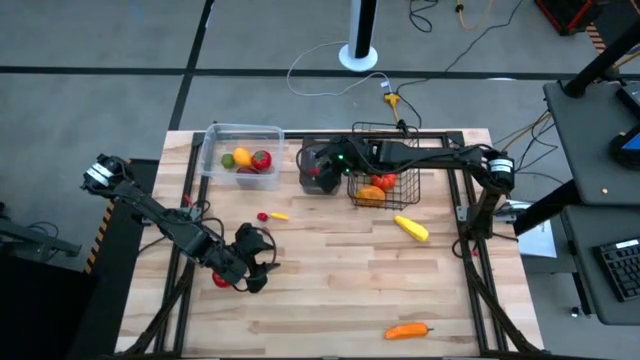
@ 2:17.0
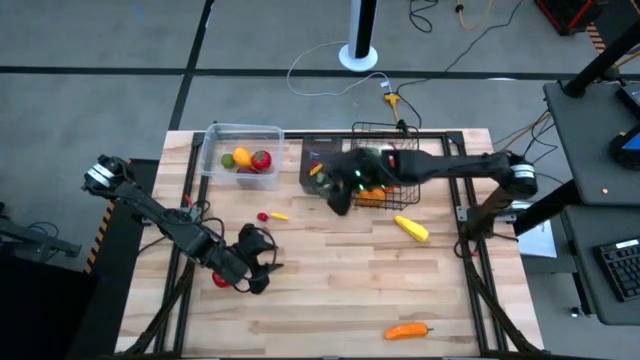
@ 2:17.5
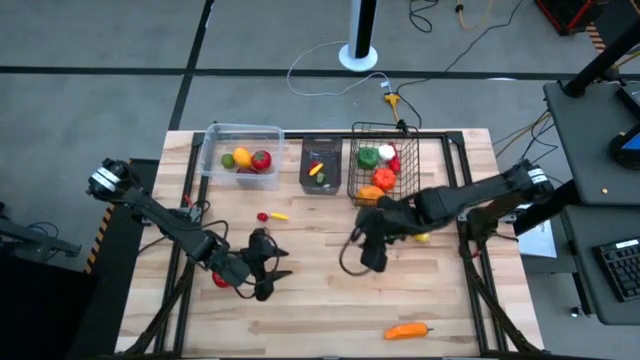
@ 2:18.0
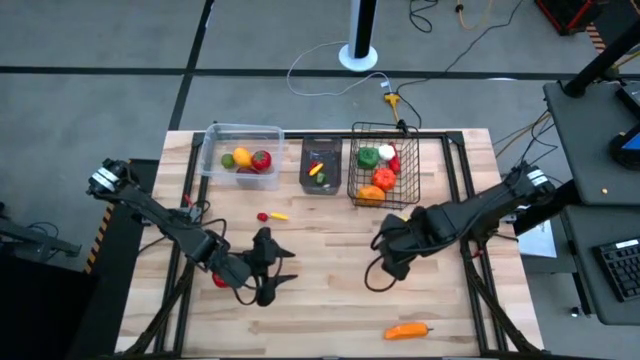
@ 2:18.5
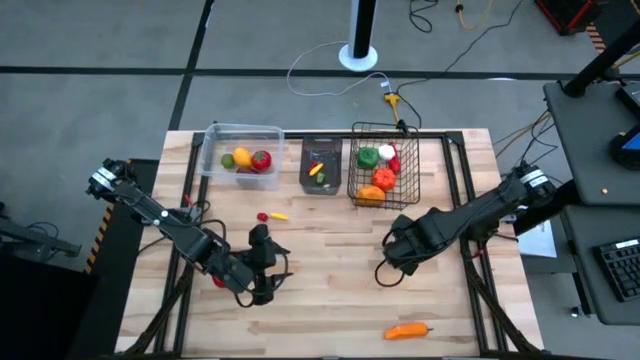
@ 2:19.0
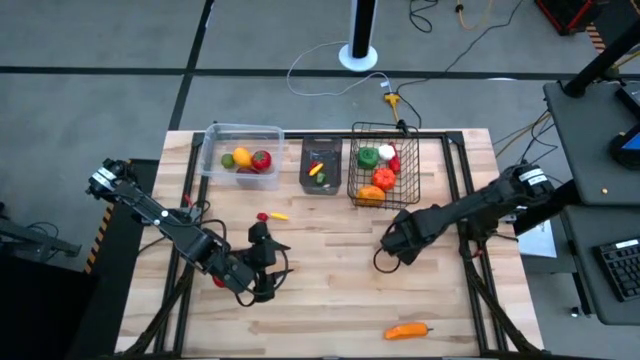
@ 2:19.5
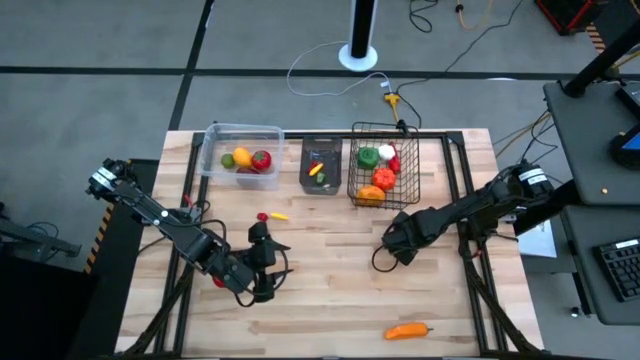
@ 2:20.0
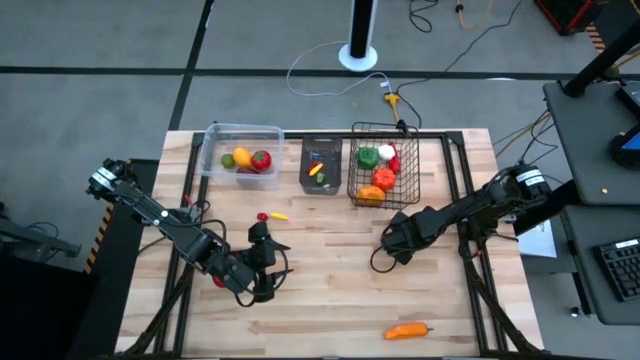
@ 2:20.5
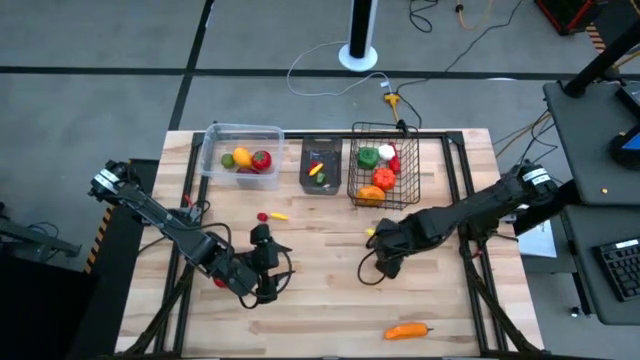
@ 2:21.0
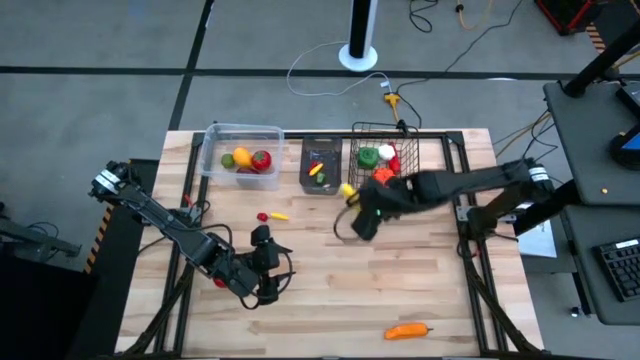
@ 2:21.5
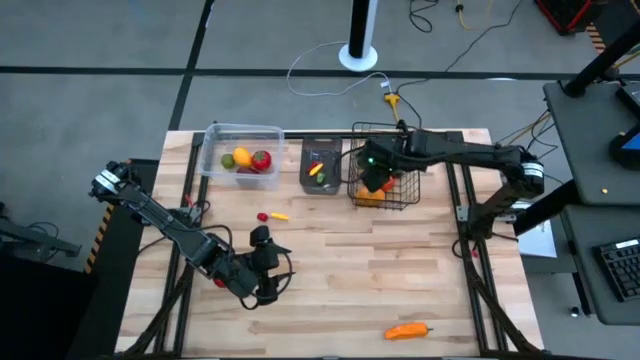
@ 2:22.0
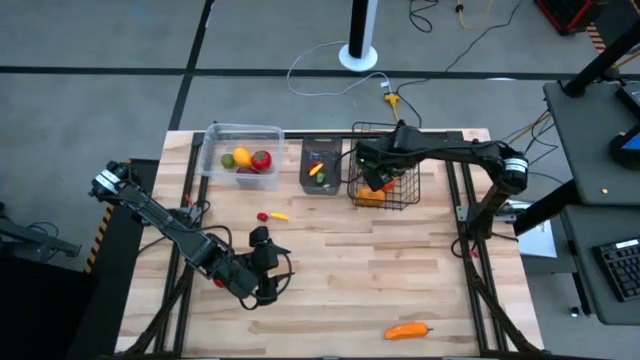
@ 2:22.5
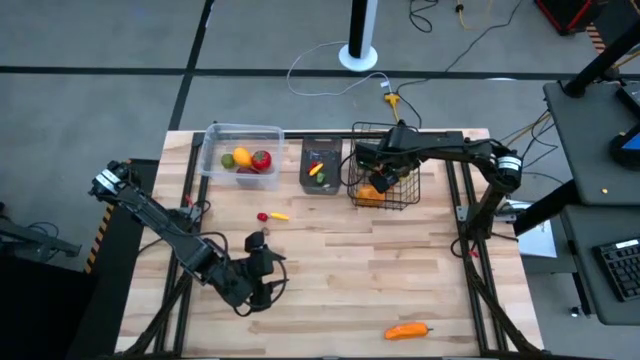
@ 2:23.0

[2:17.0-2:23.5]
Task: Sort produce into baskets
Put the yellow corn into the wire basket

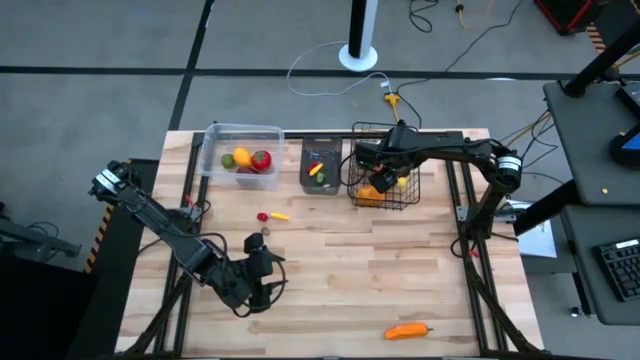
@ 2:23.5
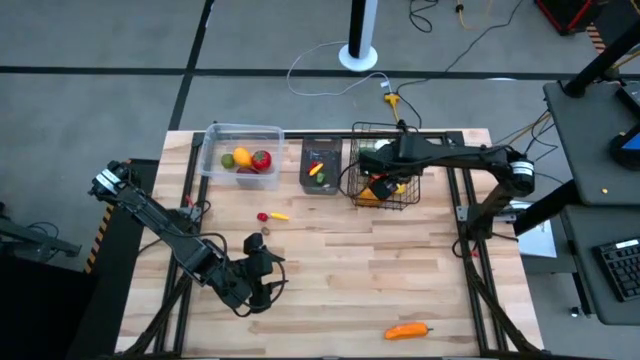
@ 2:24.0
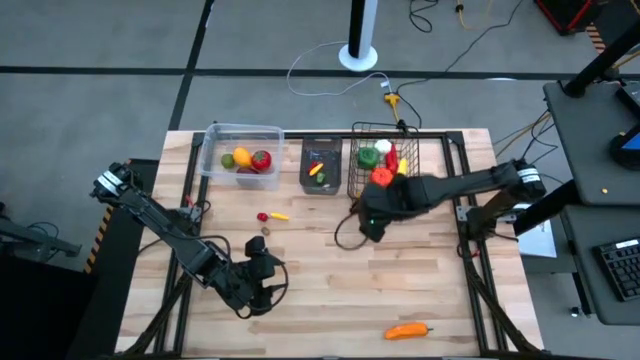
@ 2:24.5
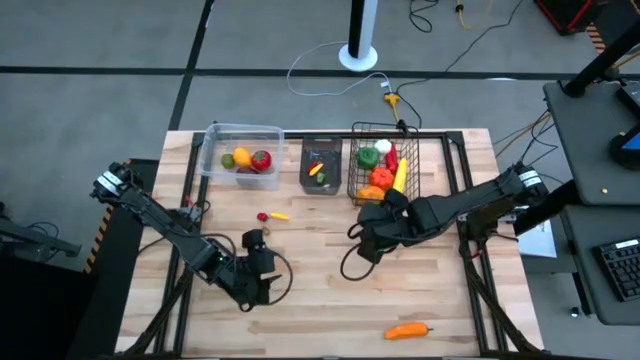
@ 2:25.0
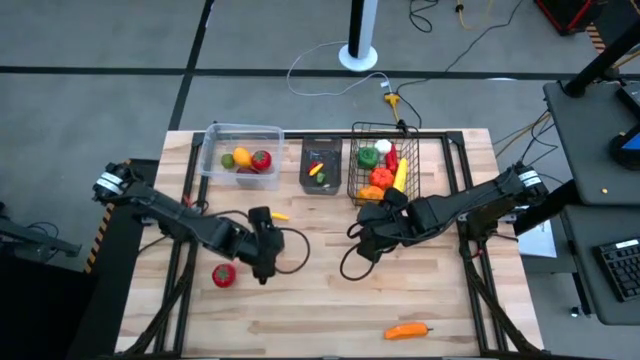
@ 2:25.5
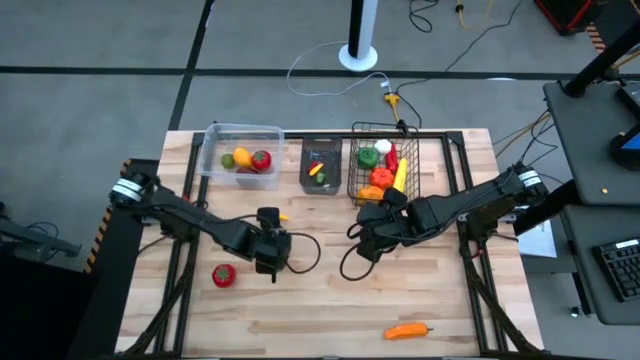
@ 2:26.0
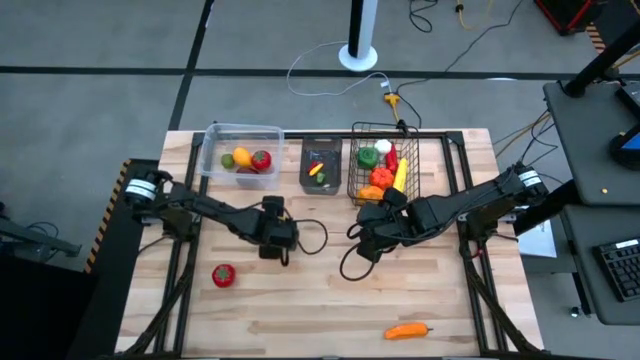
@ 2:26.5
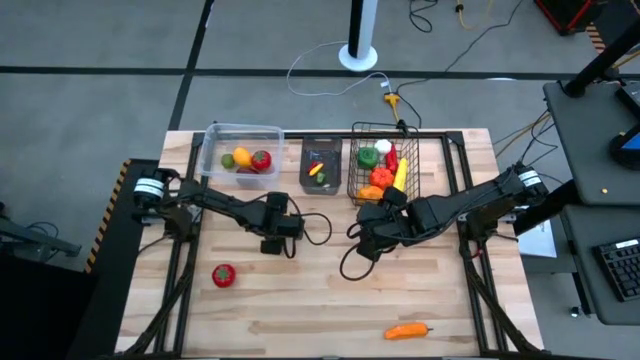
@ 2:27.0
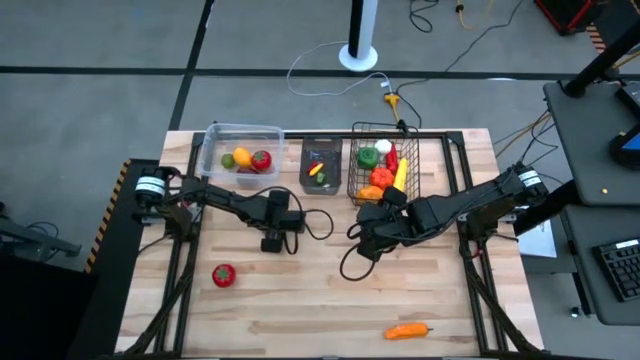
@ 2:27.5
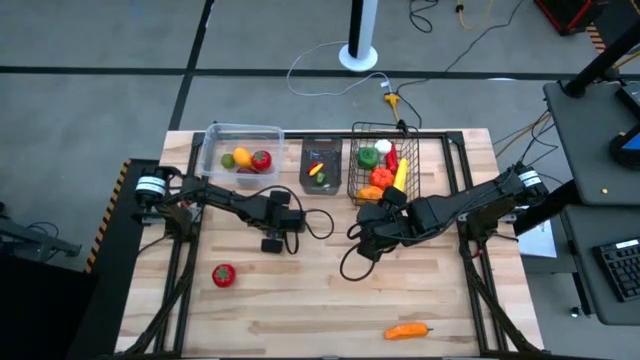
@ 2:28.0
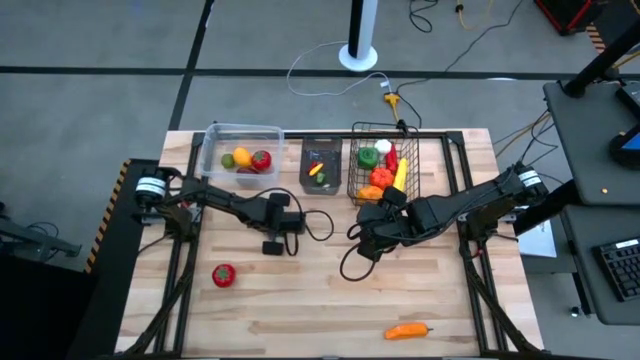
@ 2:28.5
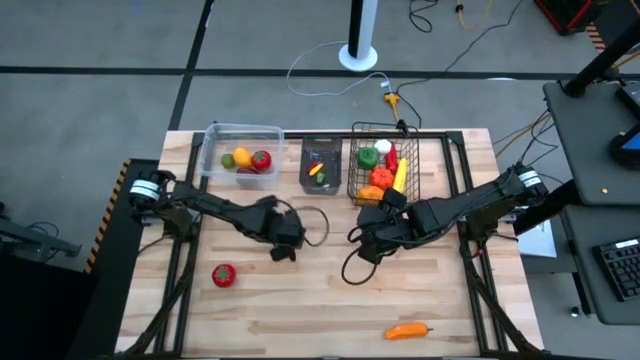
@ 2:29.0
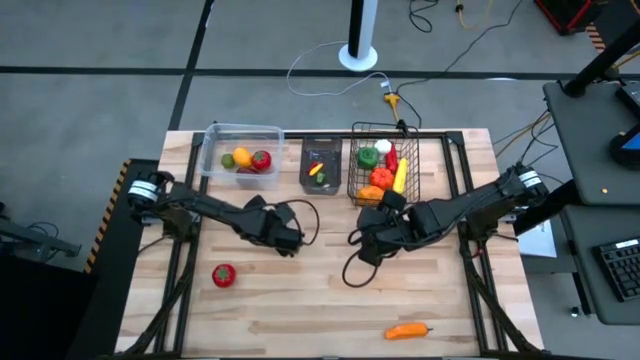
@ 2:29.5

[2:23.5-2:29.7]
Put the yellow corn into the black bin

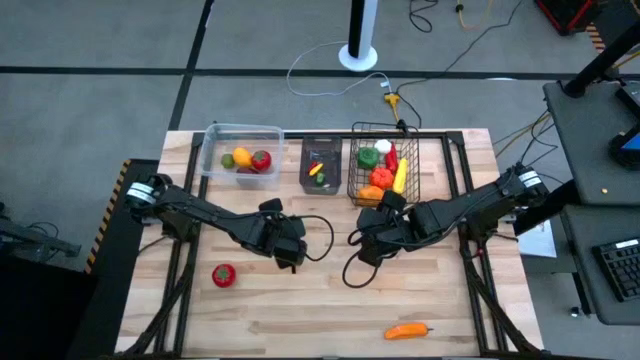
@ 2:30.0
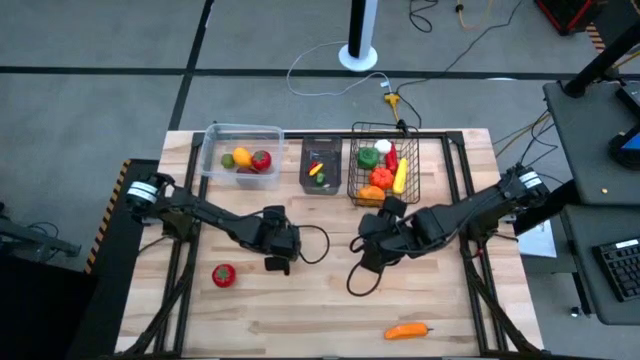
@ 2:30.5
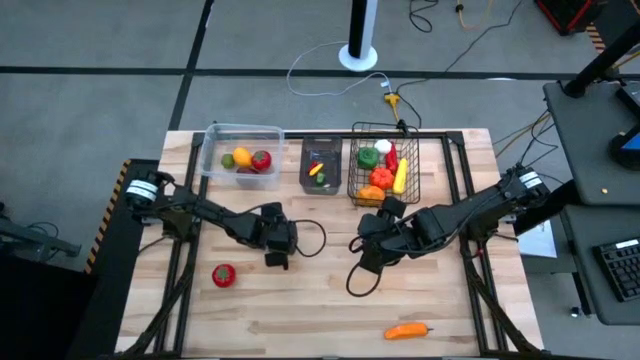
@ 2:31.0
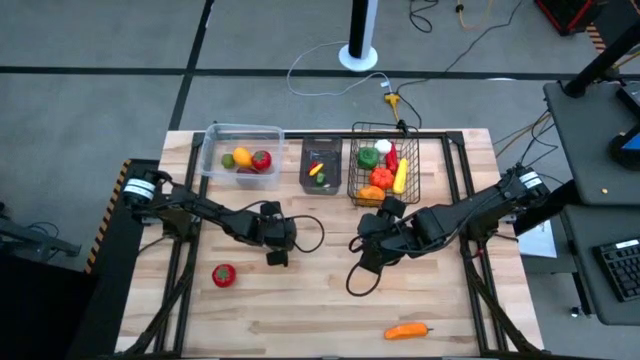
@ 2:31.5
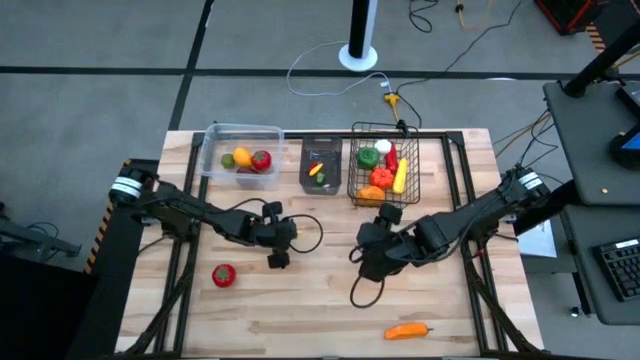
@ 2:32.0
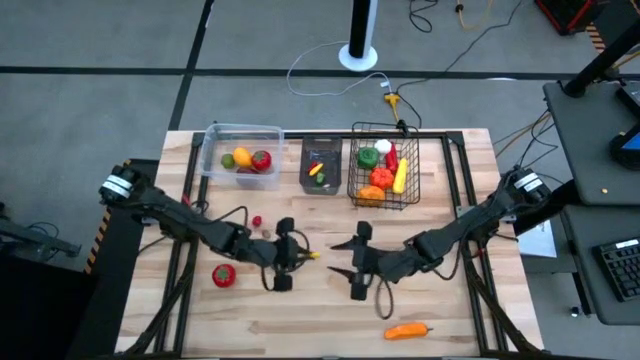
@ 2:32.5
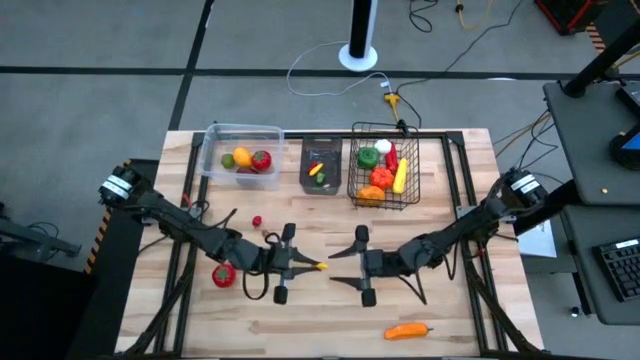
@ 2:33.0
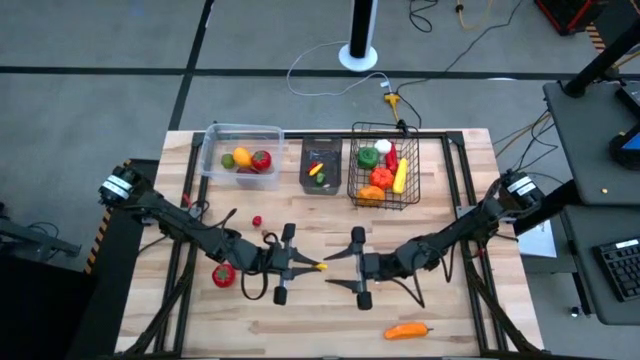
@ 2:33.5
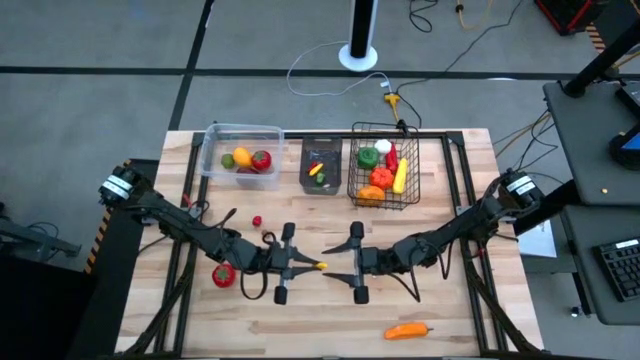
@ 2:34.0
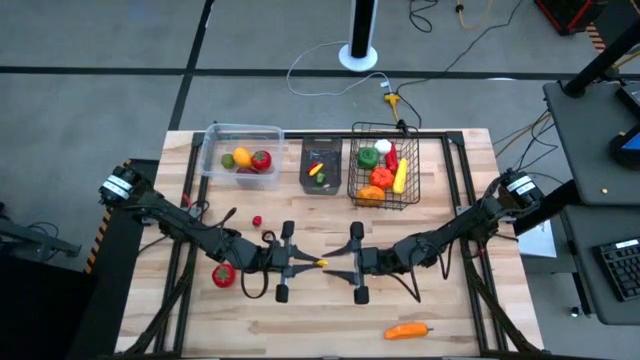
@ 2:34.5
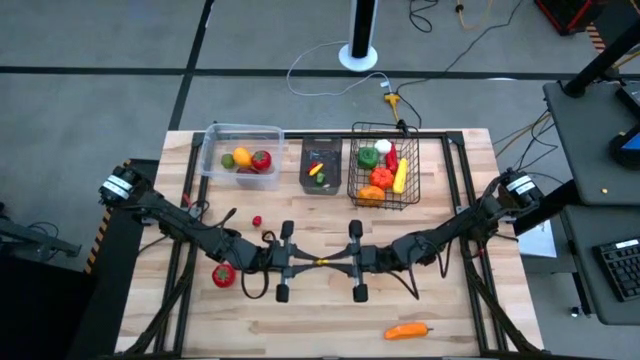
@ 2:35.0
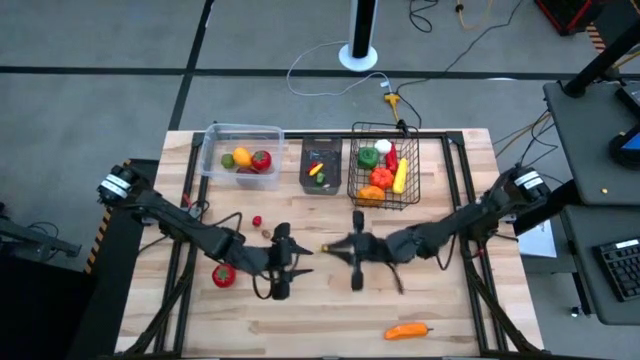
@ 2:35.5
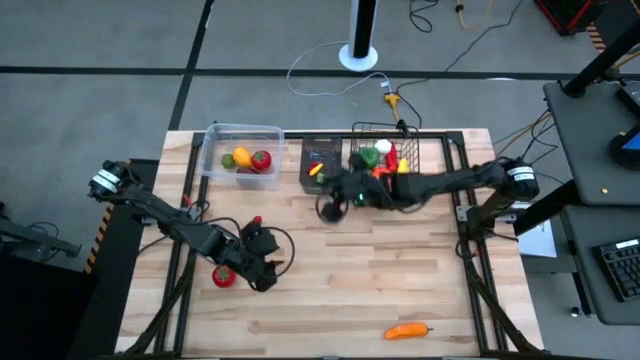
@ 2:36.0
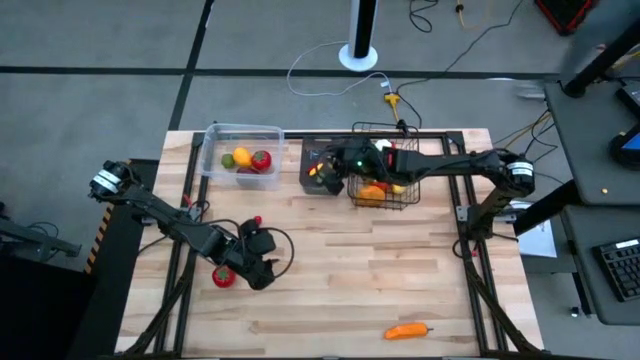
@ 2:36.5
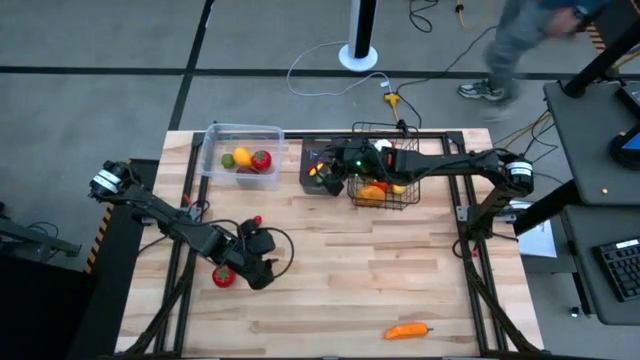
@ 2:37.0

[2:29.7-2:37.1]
Put the yellow corn into the black bin
